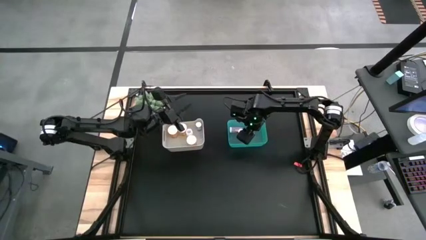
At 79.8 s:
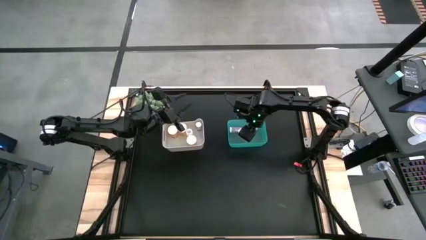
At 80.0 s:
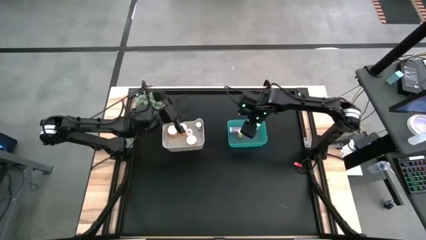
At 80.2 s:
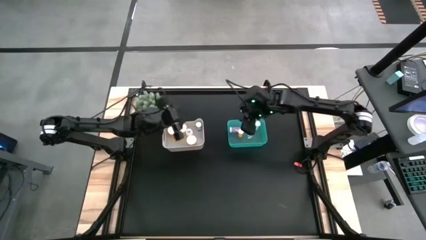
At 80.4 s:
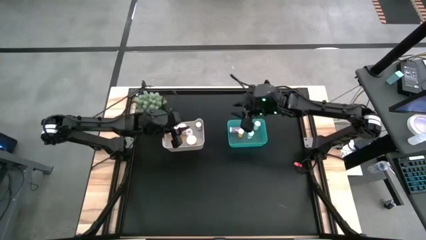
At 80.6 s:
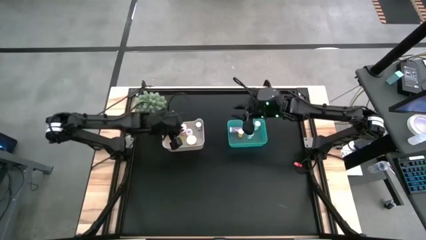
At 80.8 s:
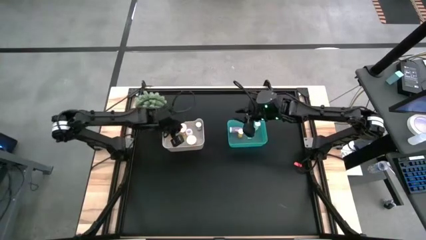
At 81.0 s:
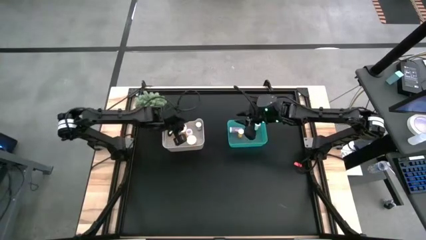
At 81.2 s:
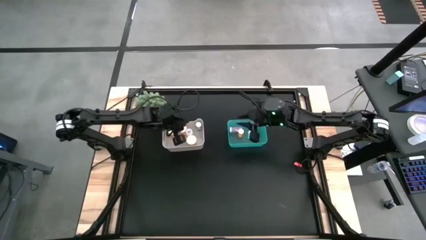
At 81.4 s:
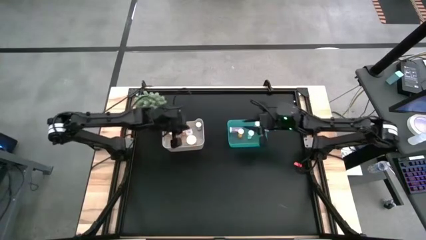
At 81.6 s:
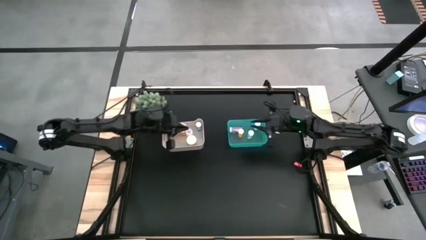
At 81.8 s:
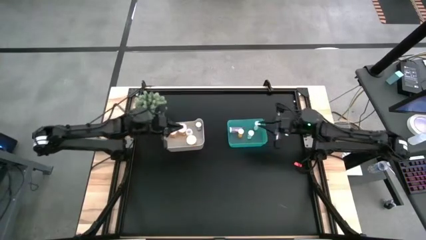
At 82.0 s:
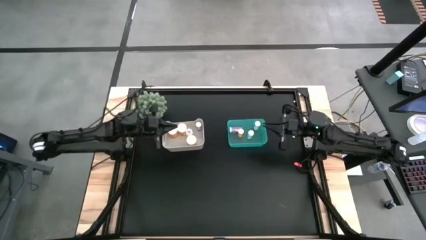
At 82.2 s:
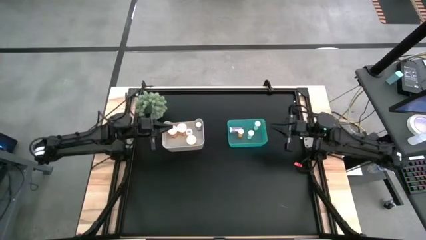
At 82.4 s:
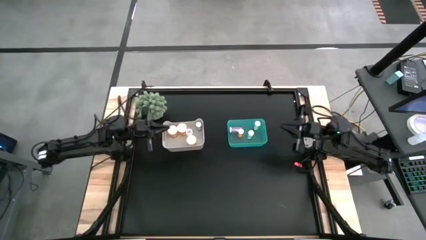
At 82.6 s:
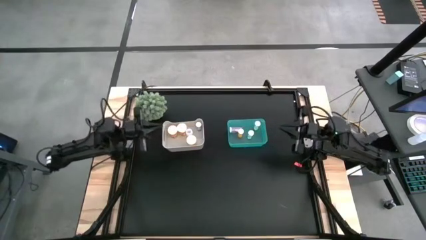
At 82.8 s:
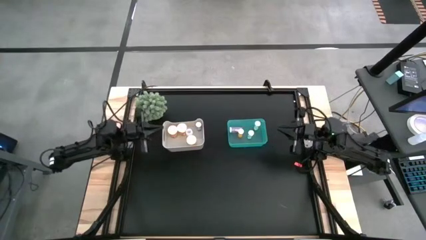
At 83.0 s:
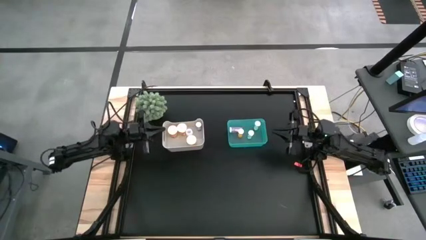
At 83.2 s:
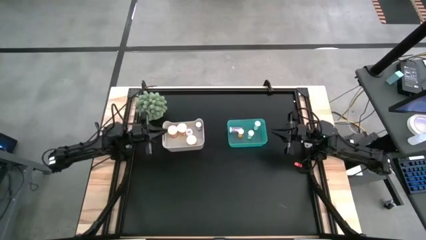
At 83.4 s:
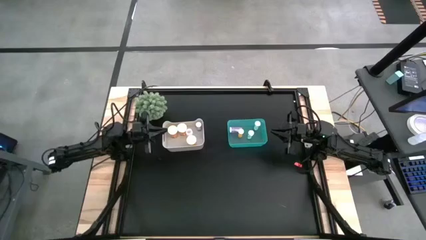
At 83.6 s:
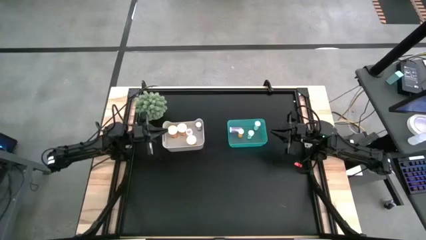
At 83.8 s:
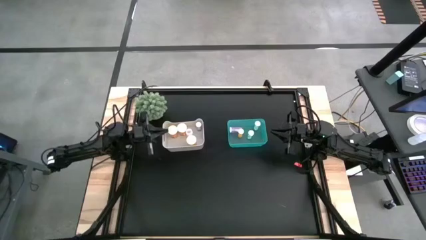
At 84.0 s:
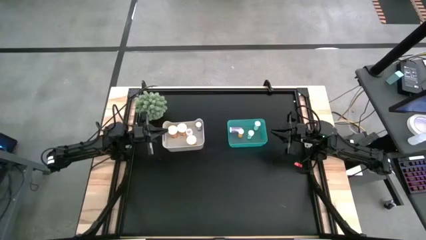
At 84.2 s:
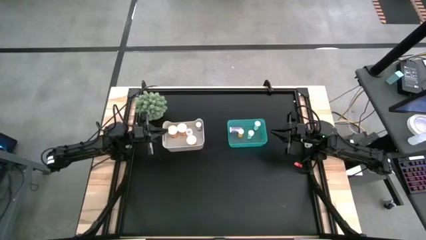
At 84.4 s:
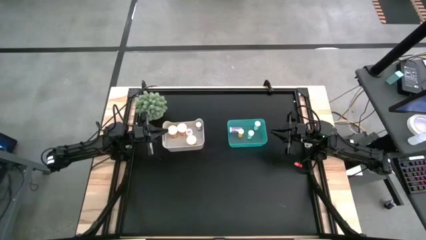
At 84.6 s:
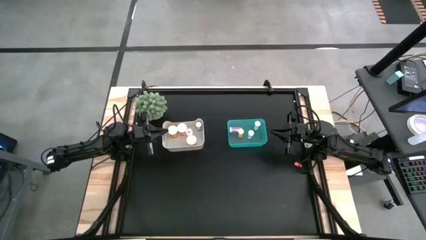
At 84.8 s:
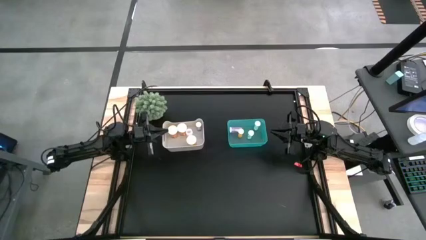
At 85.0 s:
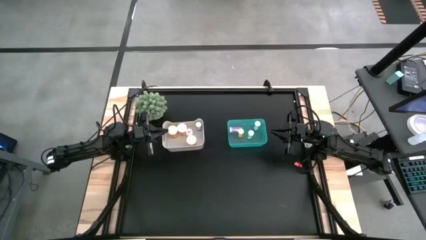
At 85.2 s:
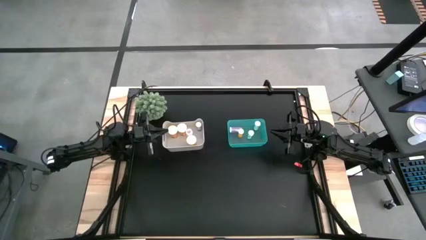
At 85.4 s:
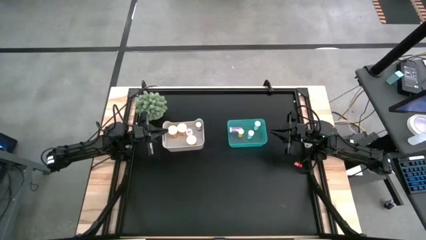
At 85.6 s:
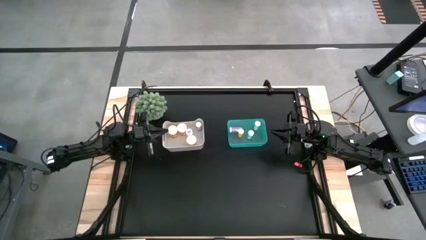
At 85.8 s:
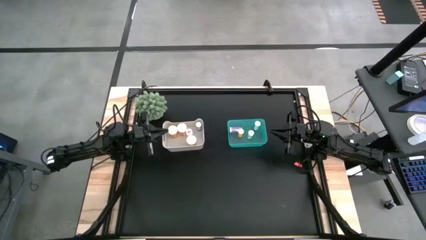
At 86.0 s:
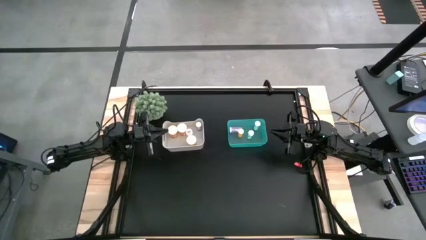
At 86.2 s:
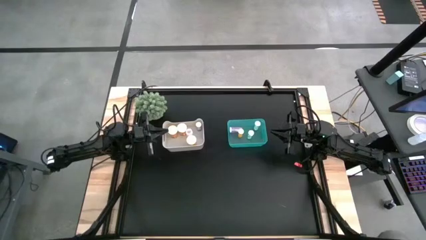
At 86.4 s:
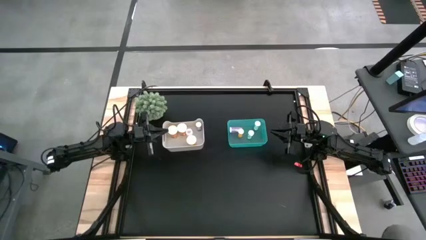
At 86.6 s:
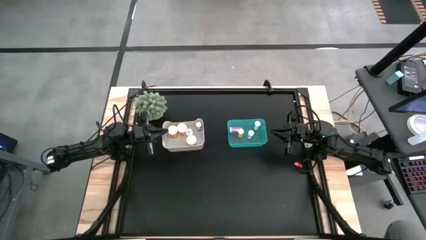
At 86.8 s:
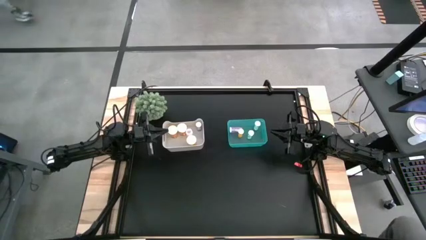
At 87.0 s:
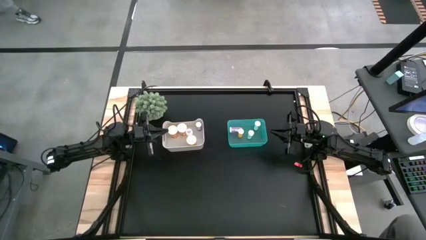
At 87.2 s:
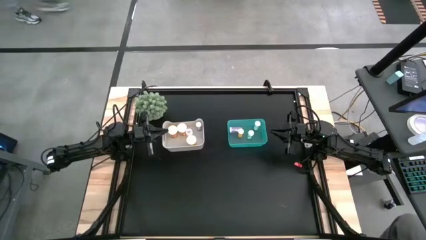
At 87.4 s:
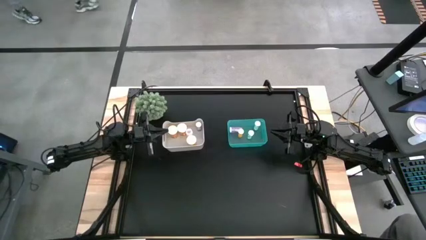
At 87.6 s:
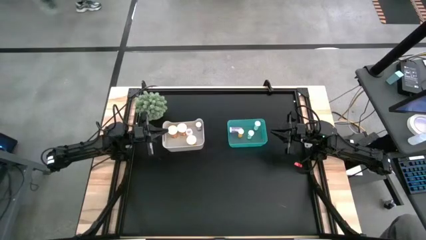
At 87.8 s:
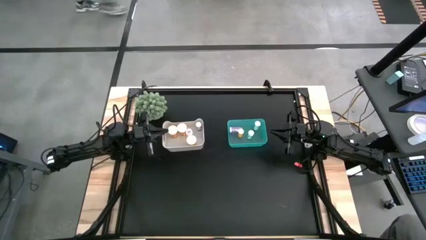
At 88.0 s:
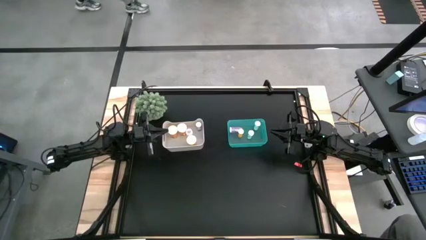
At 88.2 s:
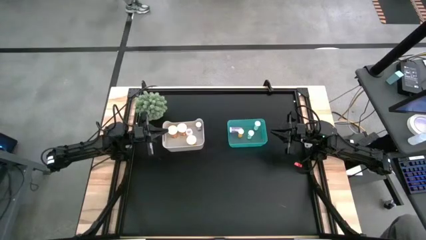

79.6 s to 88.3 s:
Task: Pick and place medicine bottles into bin by pill shape (circle, oval)
Return to Home Position

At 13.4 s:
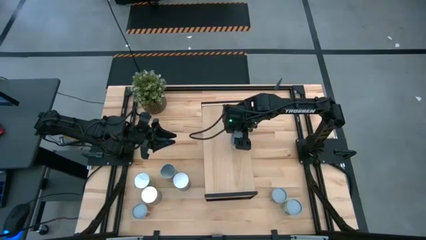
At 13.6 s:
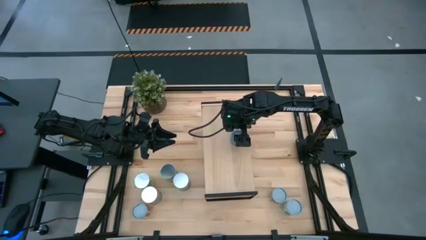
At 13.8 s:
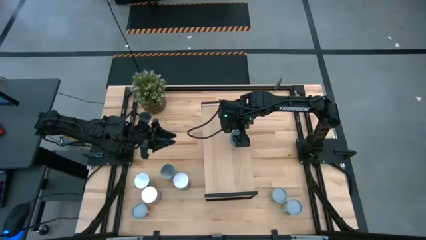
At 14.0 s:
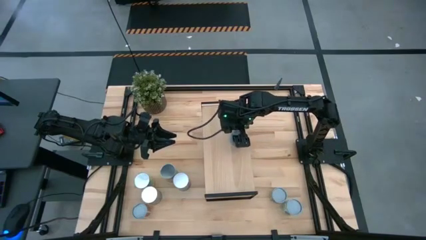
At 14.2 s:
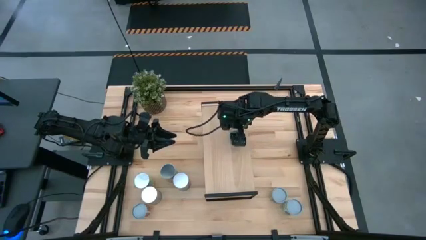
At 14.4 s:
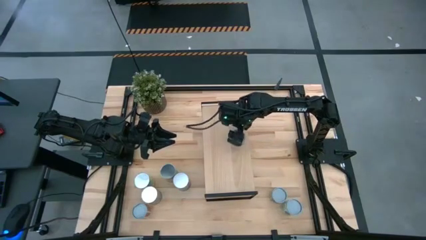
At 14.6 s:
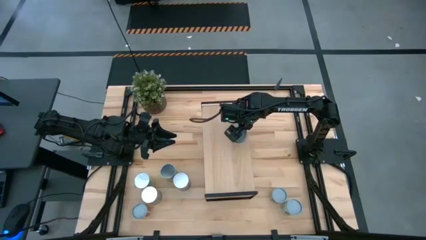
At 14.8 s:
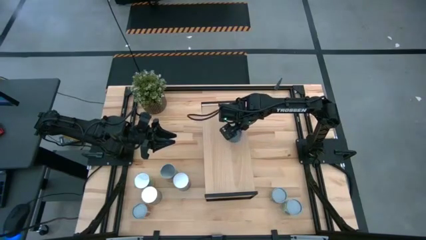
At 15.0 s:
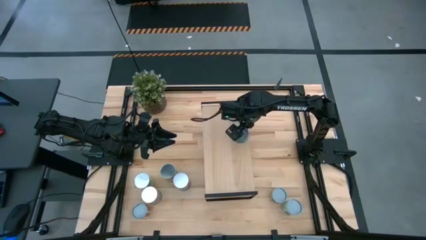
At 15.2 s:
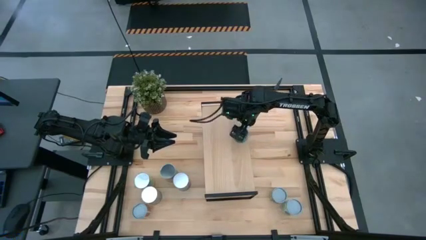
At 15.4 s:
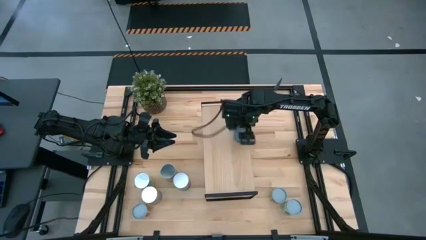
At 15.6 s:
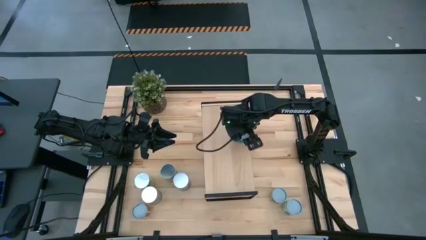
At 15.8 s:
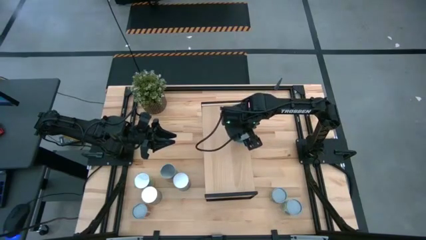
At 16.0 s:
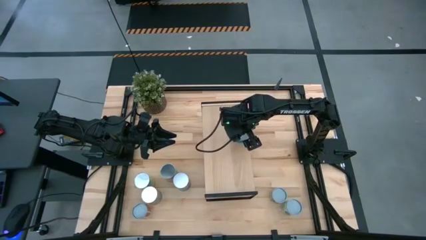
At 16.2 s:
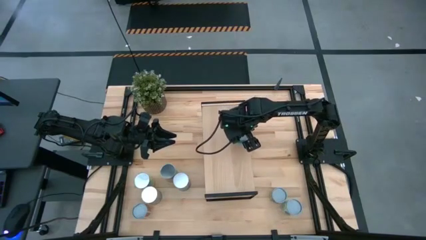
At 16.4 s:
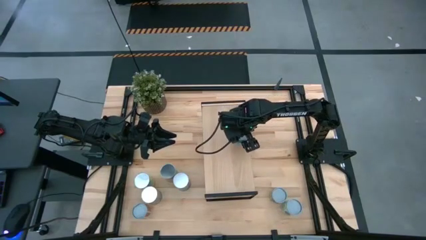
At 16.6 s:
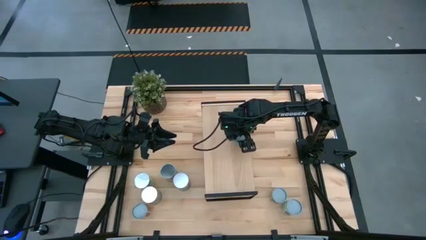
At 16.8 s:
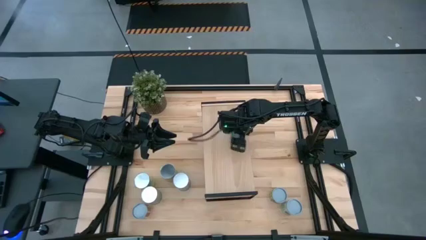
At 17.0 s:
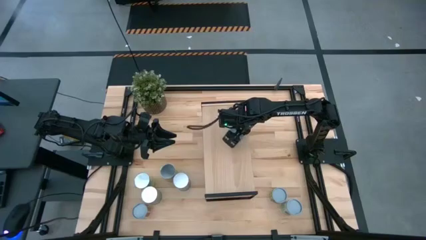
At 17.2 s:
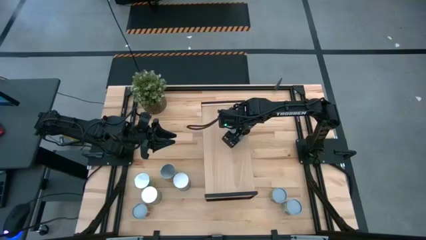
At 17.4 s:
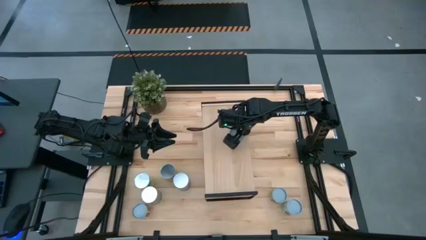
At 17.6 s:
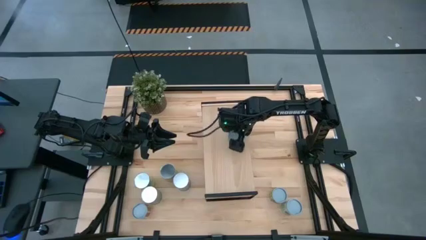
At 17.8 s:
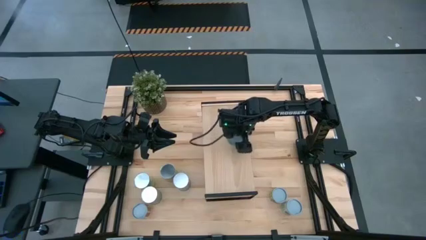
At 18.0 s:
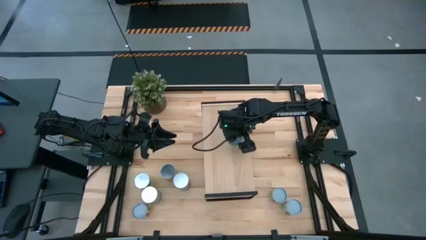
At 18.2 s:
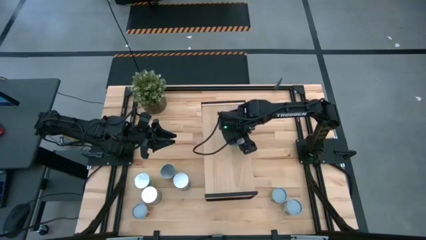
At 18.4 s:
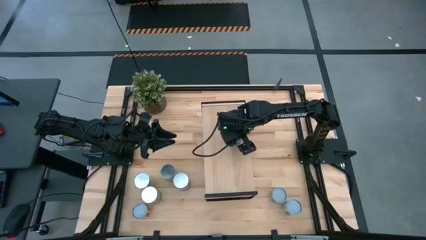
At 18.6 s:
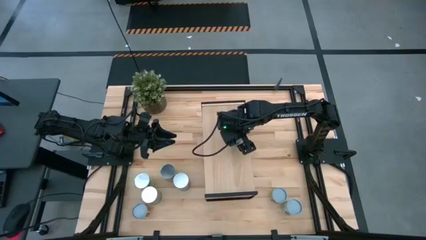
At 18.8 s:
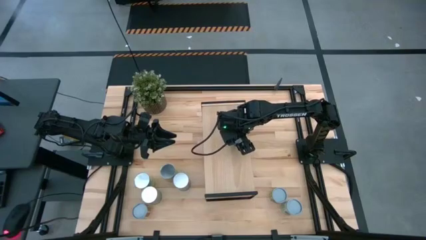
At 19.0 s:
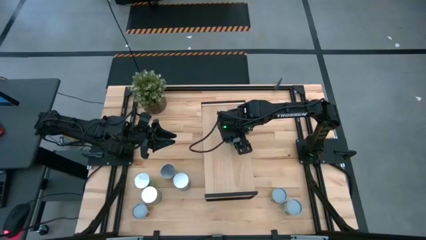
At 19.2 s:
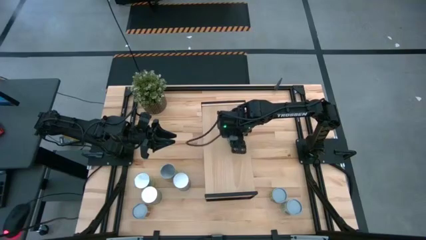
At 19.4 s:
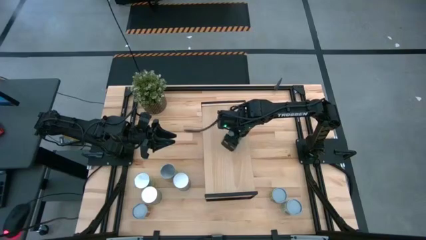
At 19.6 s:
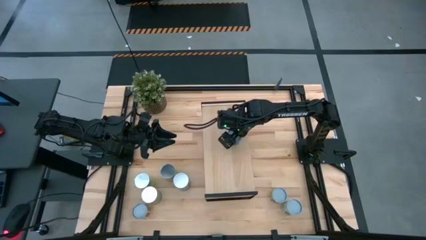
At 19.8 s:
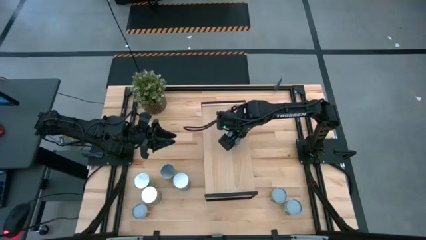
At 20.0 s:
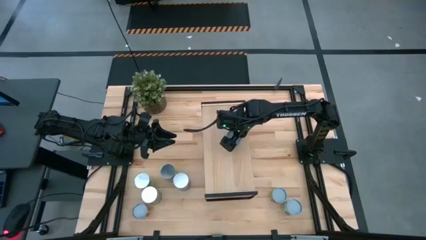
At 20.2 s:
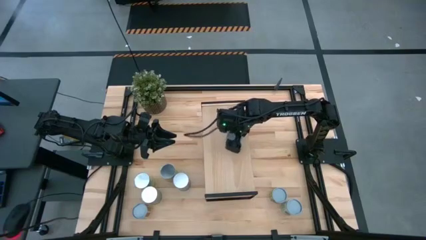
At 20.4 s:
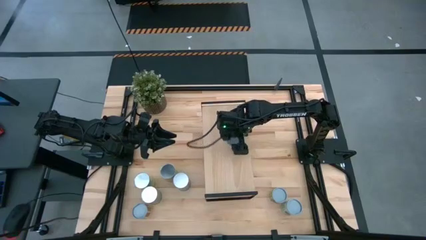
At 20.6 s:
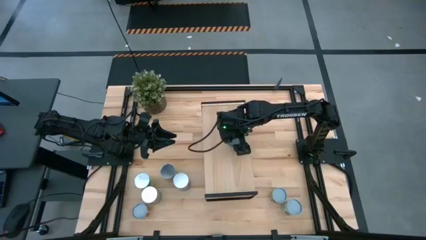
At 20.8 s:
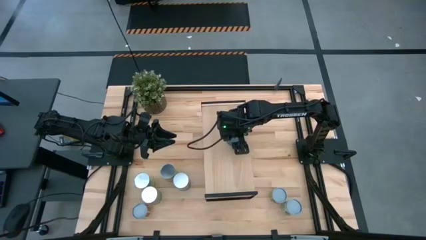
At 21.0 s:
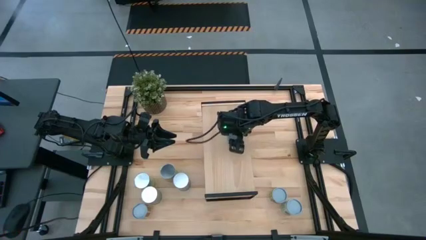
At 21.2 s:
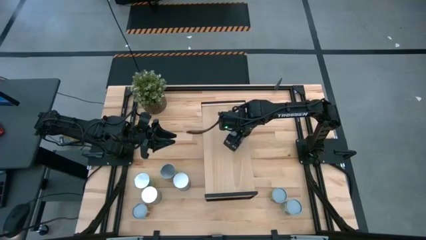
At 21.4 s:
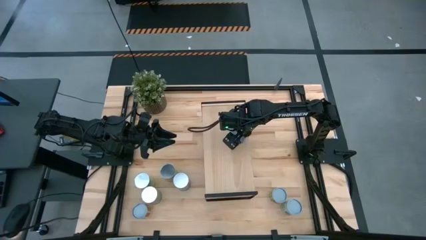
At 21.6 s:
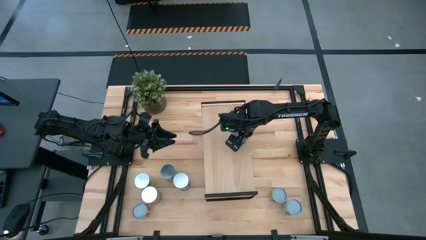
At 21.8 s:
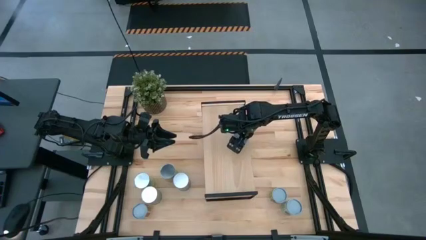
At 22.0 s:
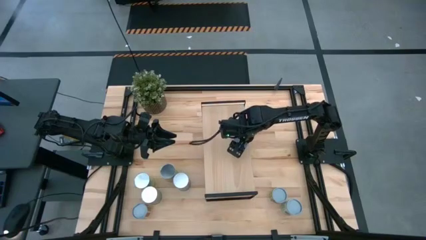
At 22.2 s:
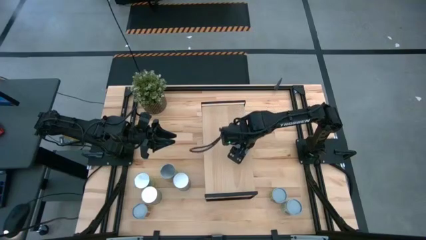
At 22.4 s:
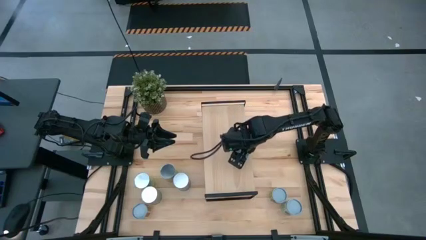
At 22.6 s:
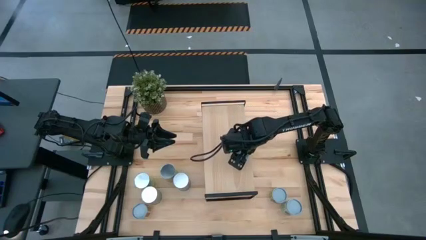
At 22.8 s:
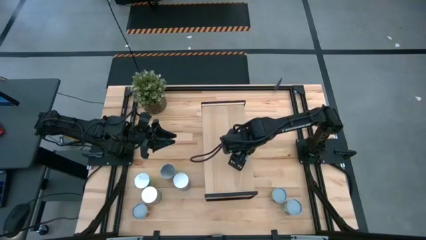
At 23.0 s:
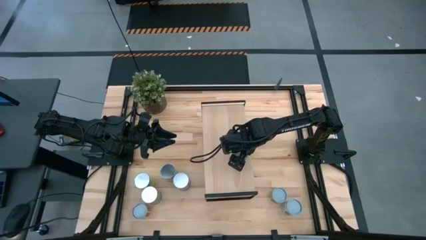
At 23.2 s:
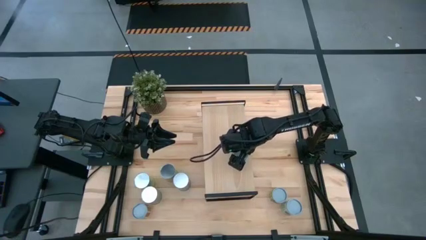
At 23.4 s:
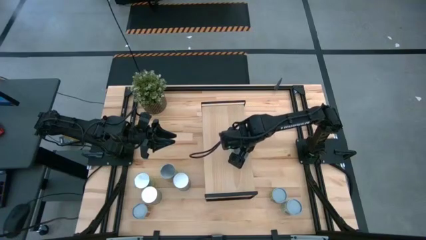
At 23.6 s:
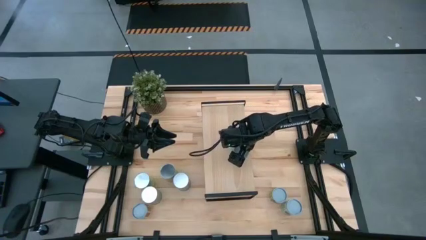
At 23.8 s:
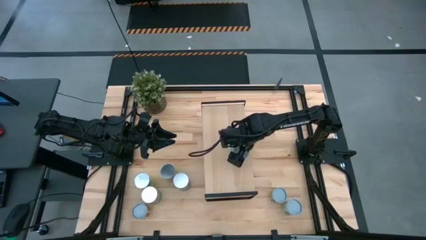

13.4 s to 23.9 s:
Task: Pick and place cans onto a shelf
Put the green tuna can on the shelf
